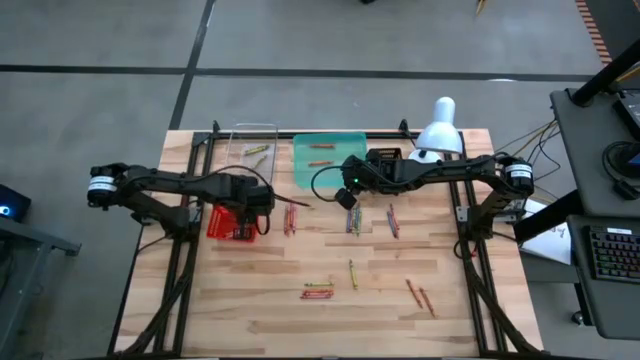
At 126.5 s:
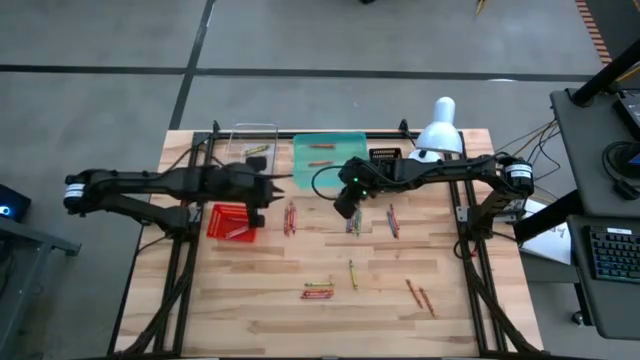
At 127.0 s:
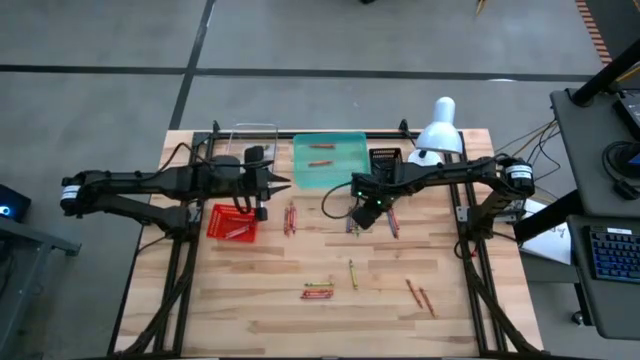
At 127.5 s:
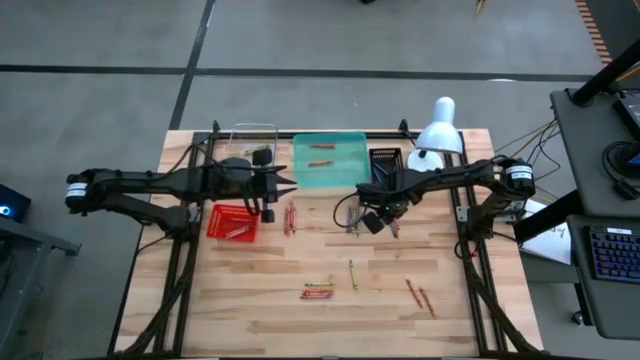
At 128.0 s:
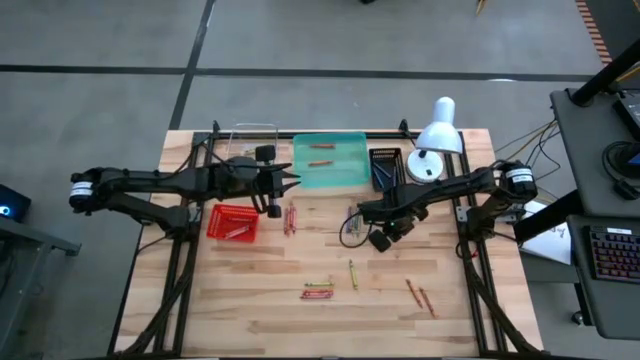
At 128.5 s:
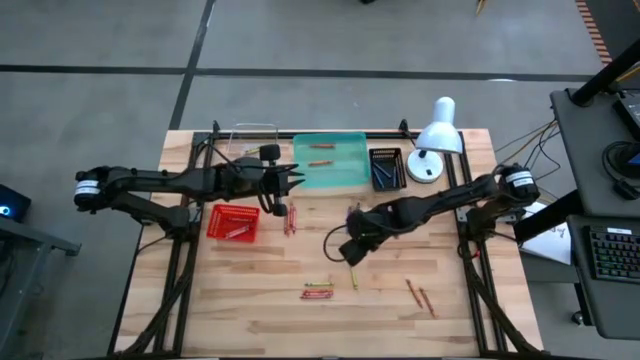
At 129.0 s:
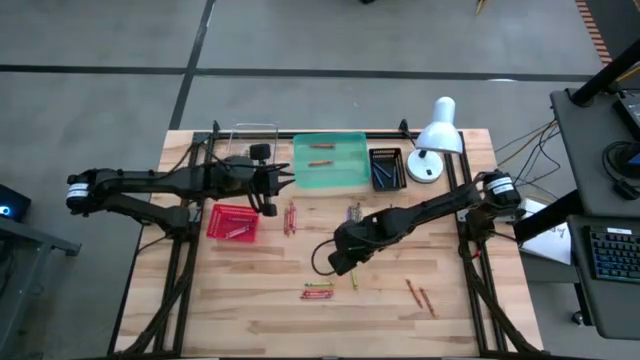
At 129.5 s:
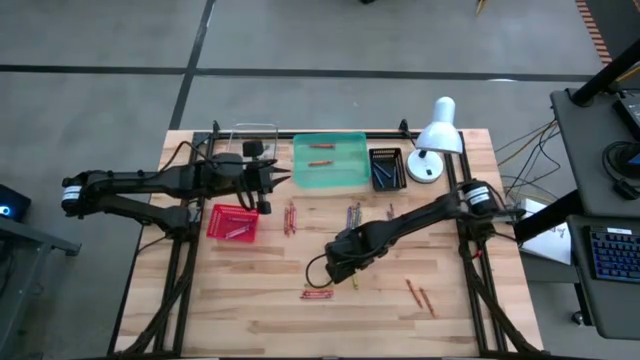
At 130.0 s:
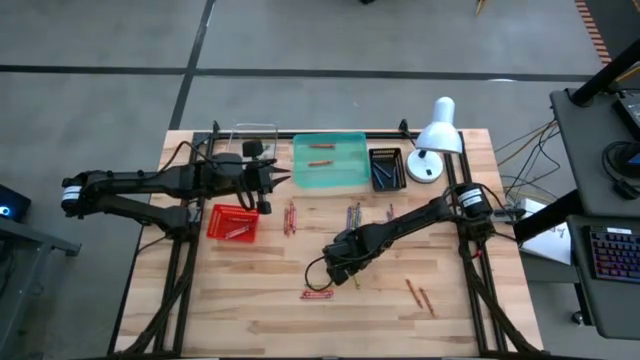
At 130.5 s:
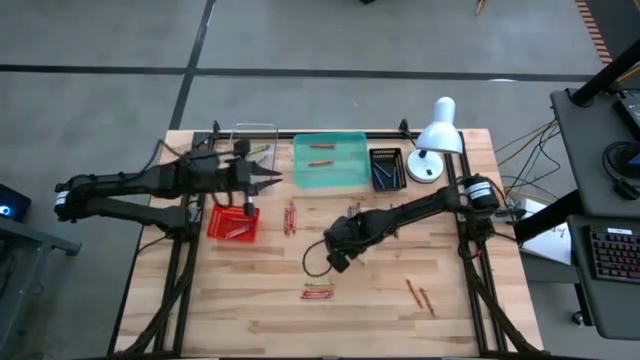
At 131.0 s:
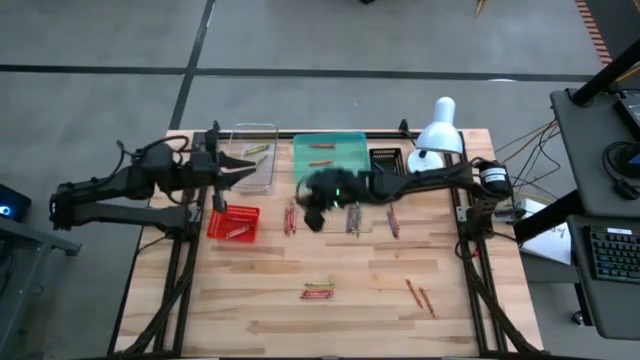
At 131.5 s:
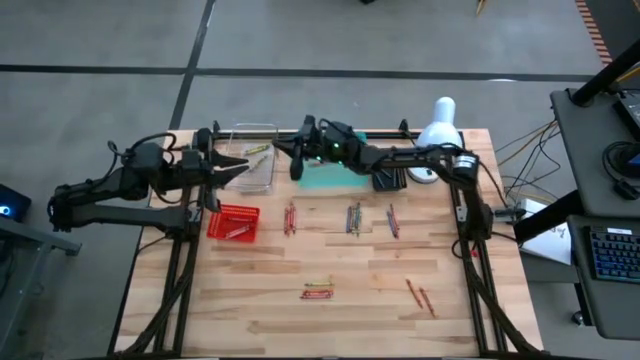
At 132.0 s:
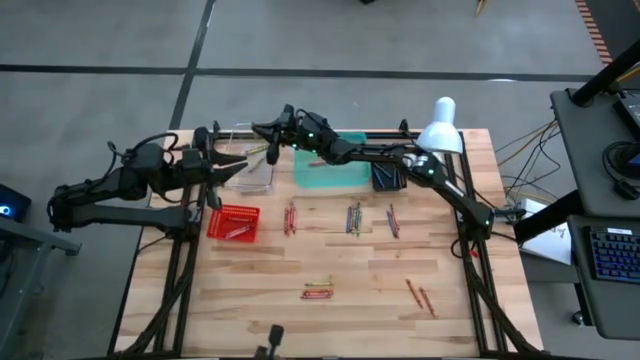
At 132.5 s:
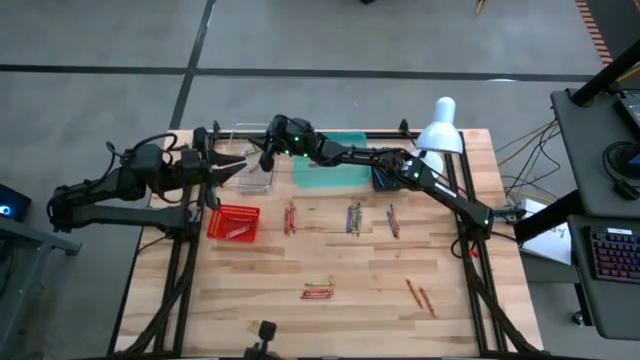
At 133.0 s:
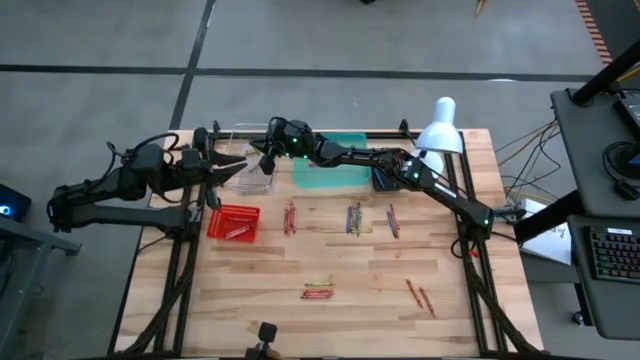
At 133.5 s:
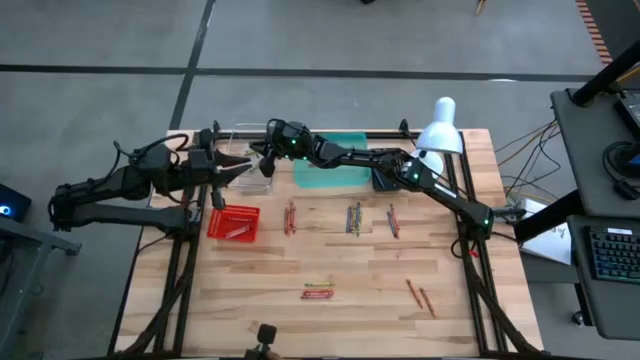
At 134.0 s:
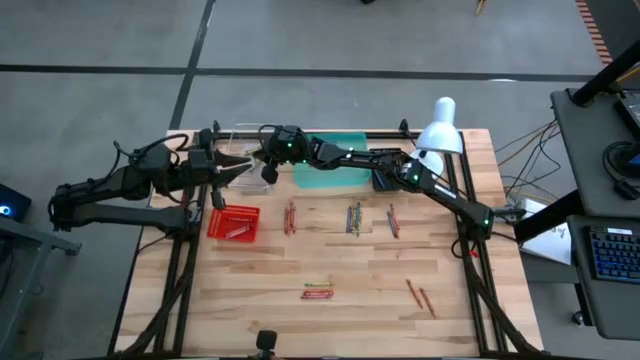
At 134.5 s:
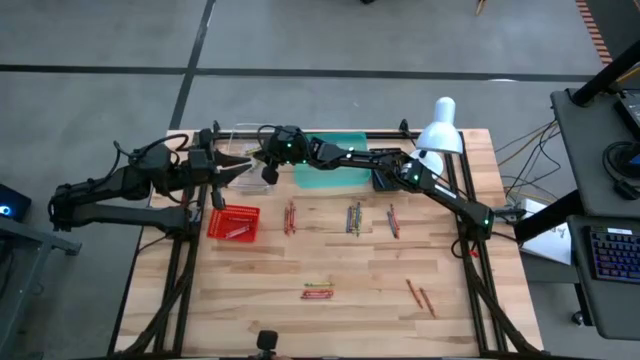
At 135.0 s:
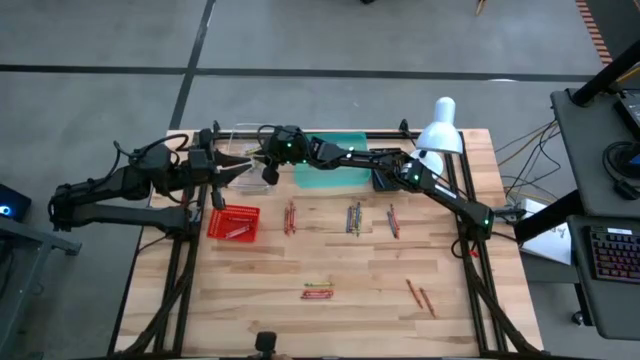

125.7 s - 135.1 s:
Task: Sort crayons
Put the green crayon into the transparent bin

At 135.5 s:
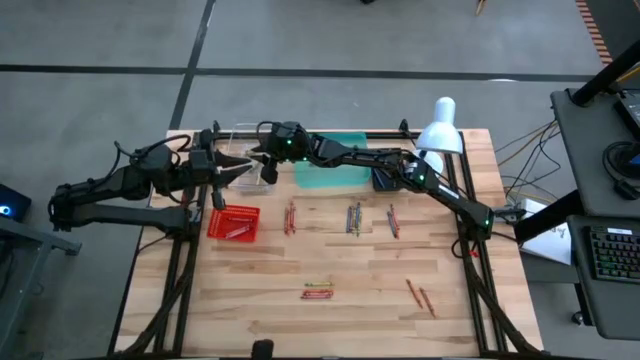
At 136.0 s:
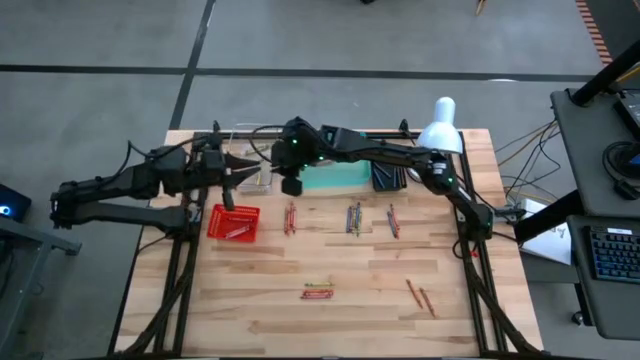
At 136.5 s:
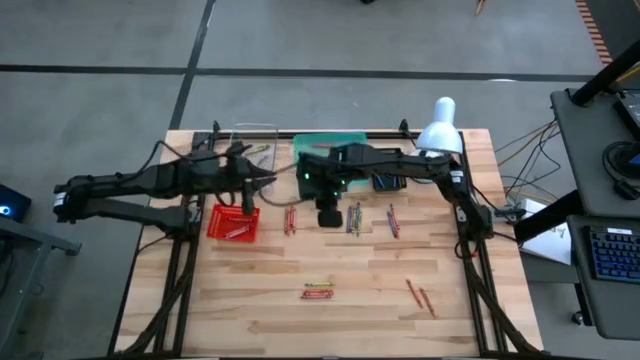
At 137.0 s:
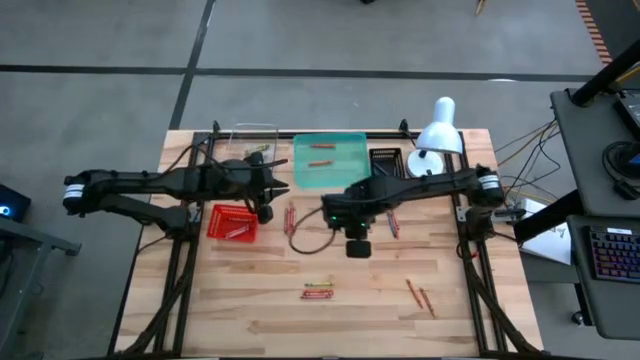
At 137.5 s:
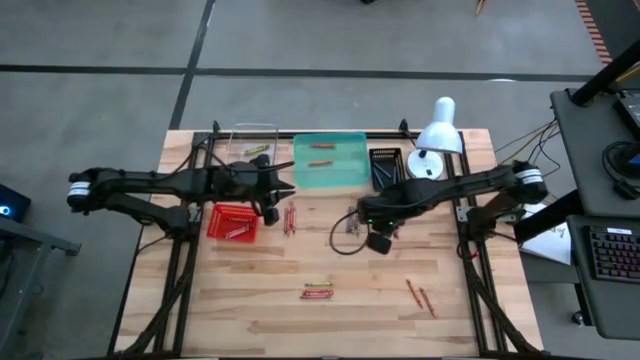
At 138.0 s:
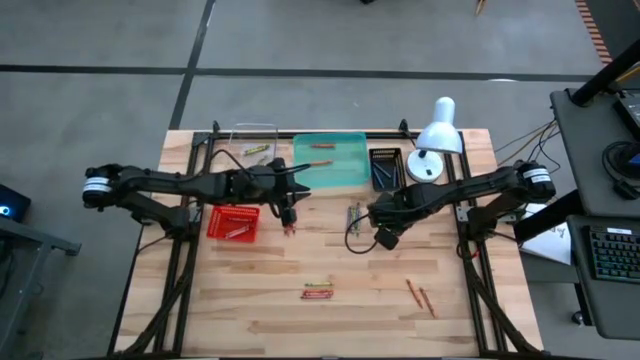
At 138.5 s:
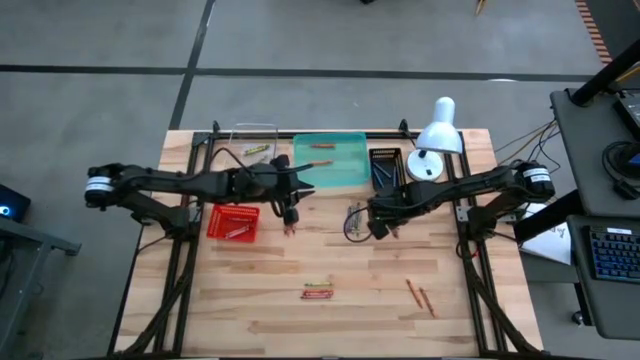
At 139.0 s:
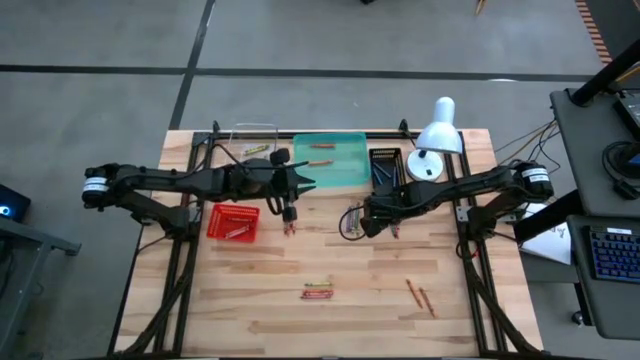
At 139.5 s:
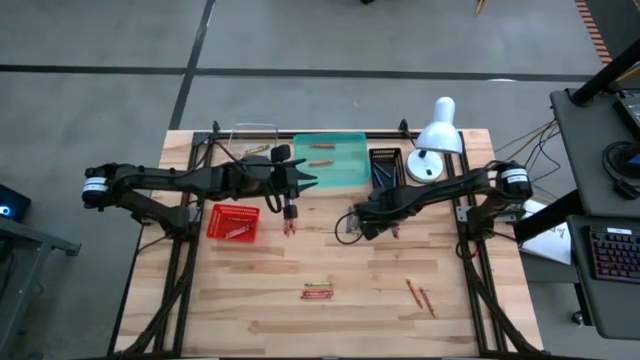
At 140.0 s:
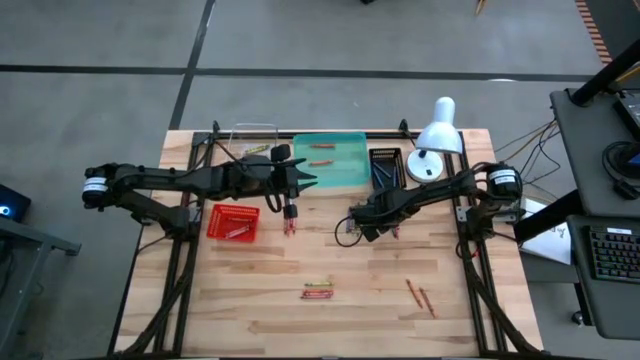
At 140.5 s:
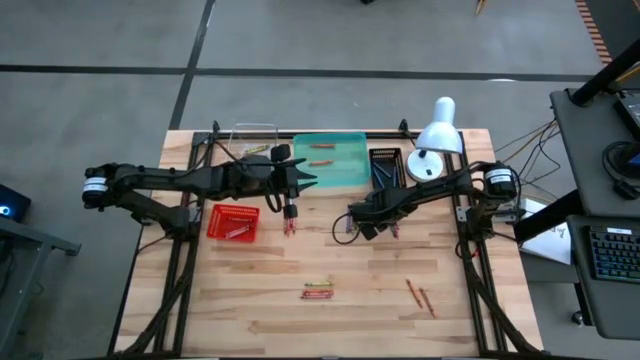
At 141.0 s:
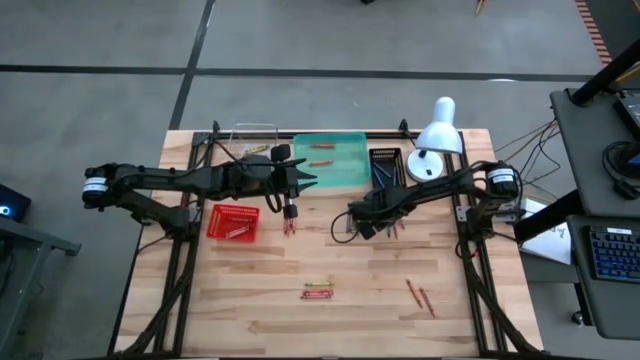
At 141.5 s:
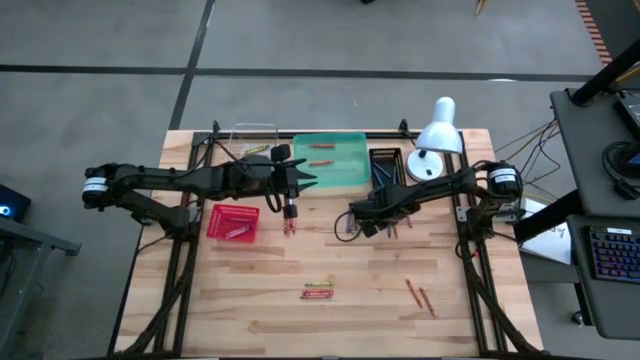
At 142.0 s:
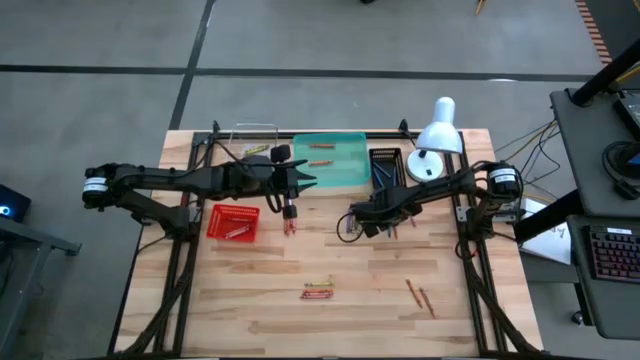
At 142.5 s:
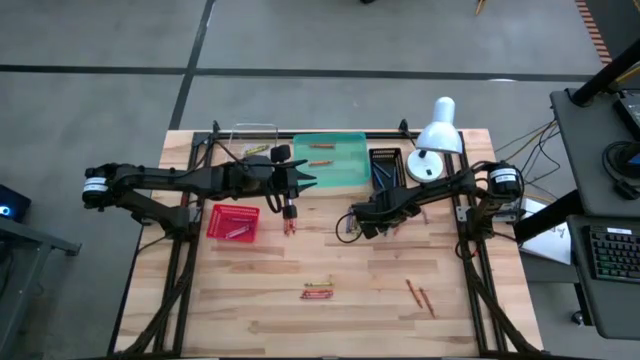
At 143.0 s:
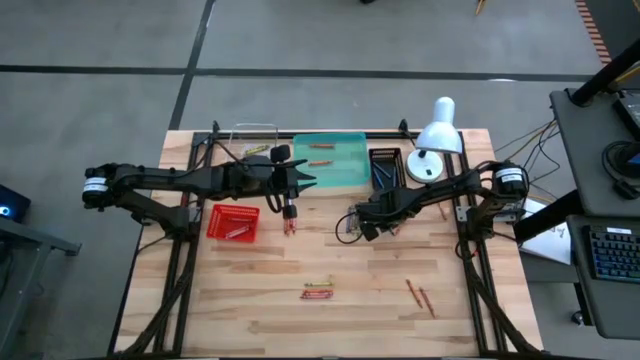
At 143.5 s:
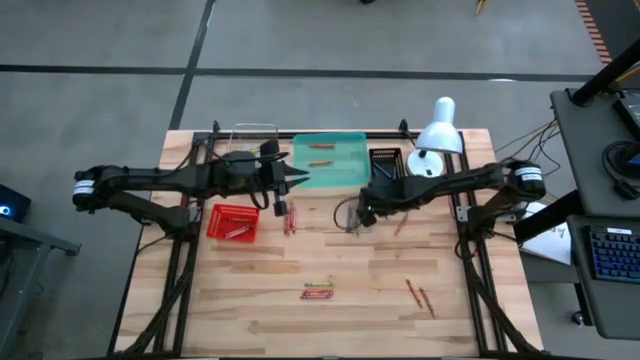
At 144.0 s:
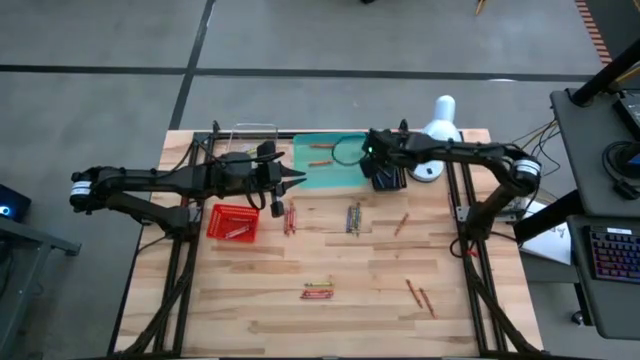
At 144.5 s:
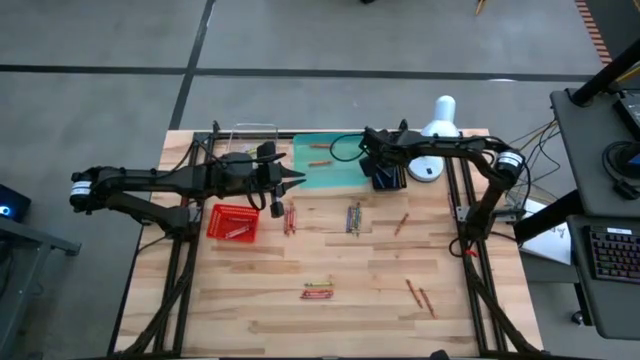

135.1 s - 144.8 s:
Put the blue crayon into the black bin

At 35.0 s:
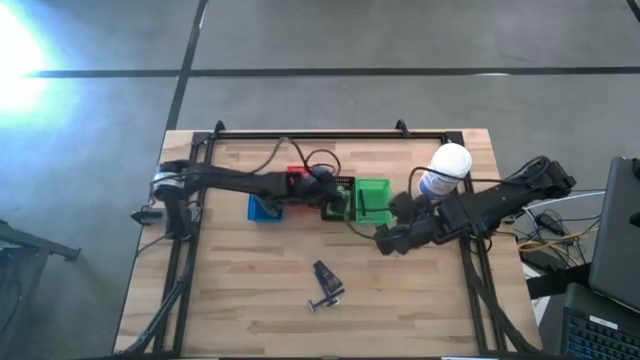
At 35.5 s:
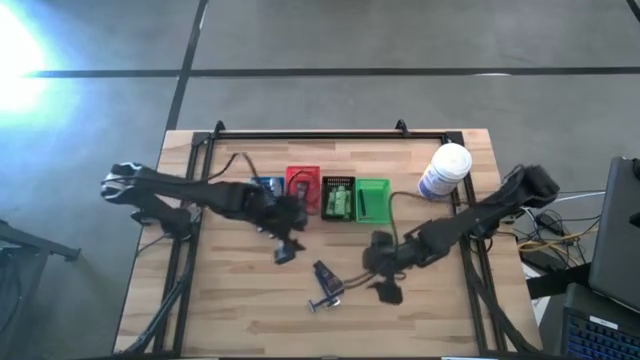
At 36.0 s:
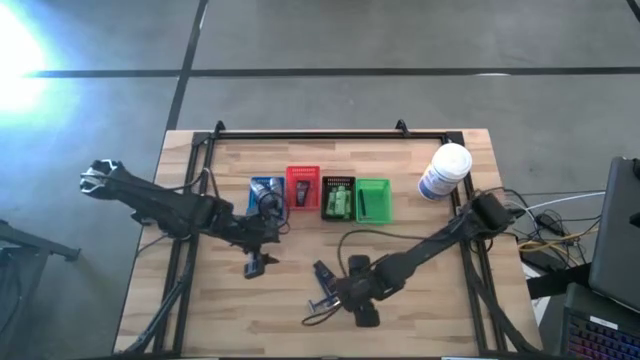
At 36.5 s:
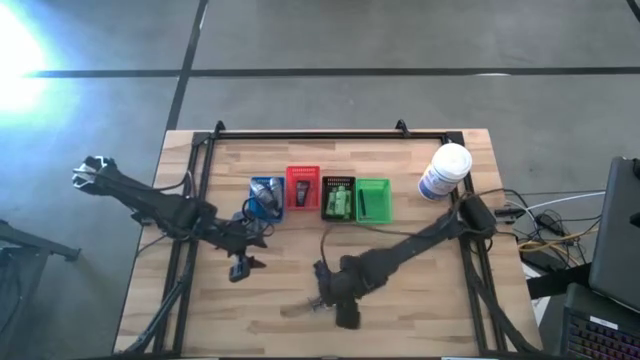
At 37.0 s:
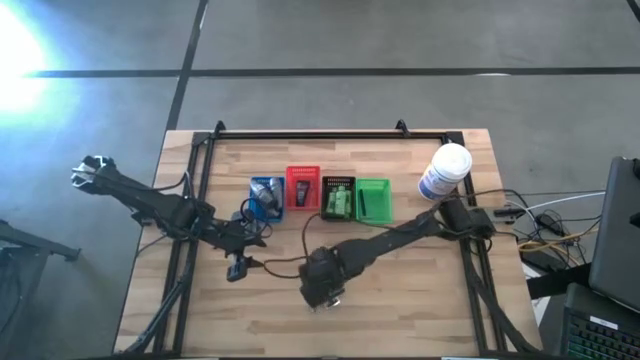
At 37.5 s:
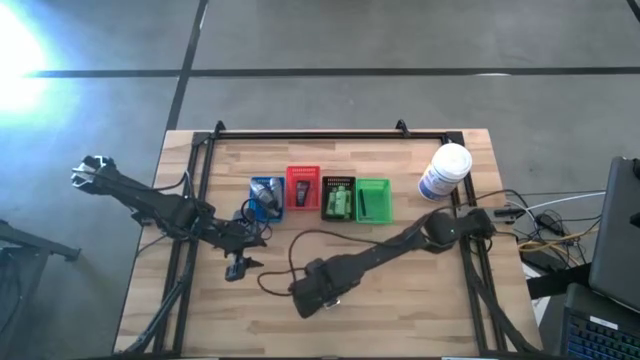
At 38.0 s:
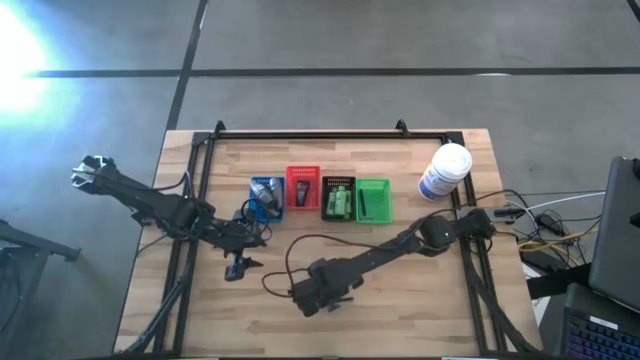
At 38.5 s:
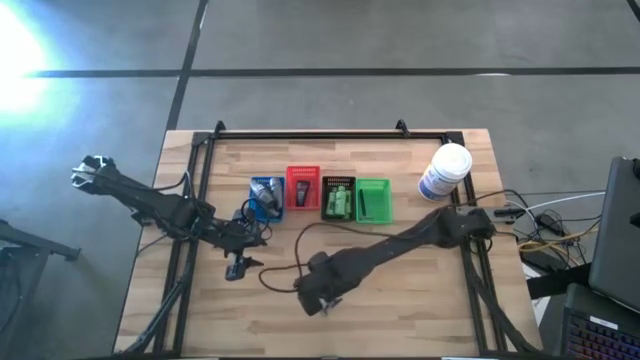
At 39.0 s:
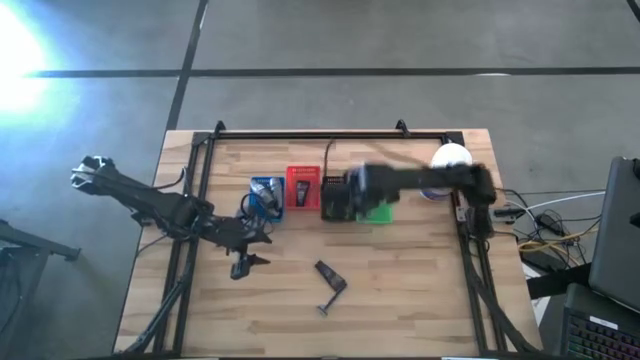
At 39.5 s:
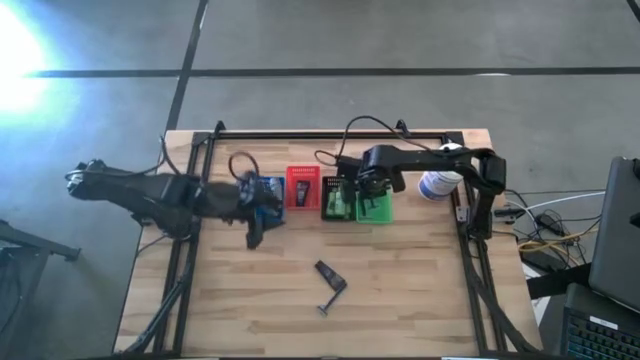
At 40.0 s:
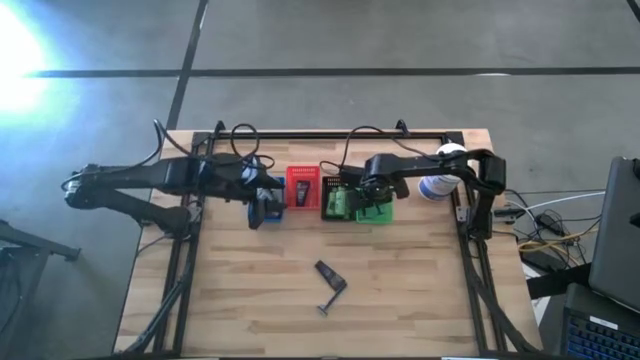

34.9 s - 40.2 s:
Task: Pick & Place Travel size toiletries
Put the blue razor into the green bin
